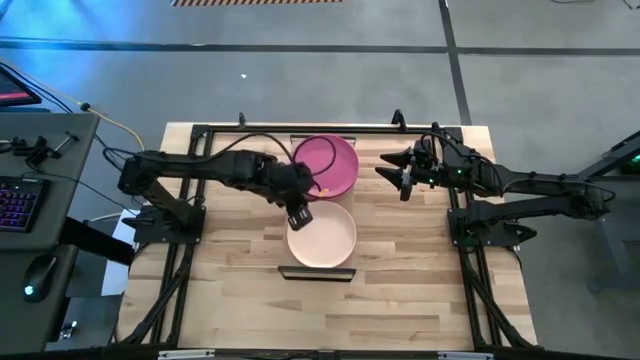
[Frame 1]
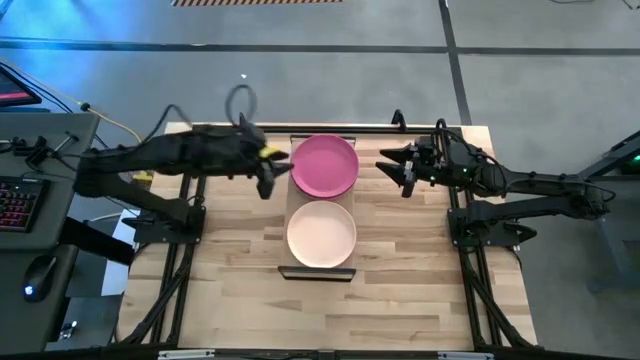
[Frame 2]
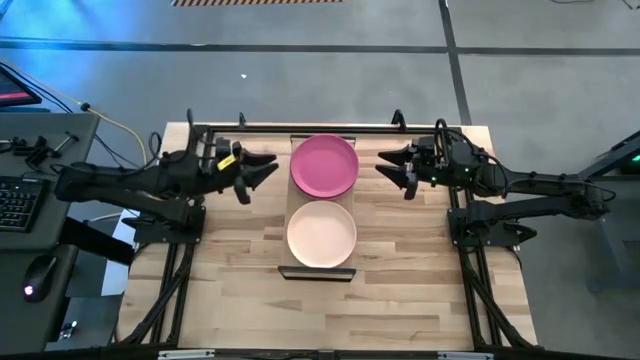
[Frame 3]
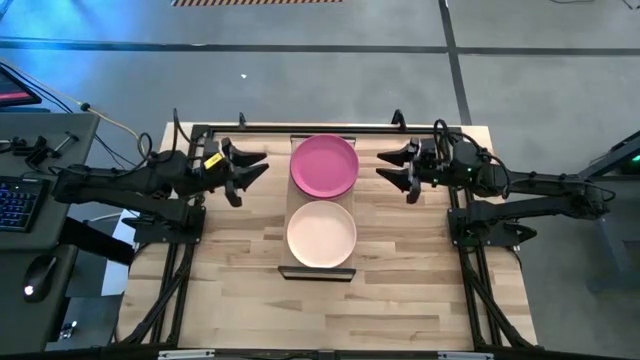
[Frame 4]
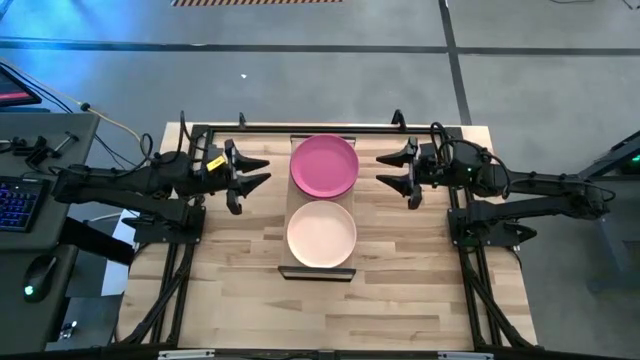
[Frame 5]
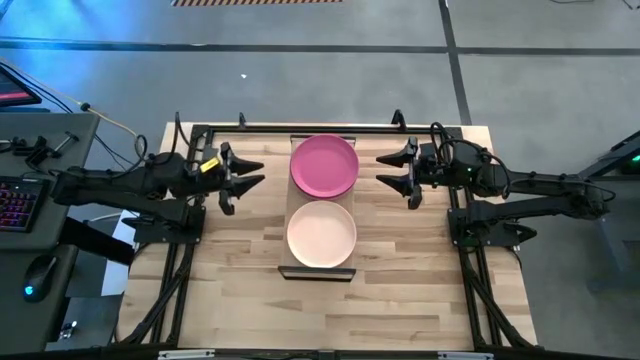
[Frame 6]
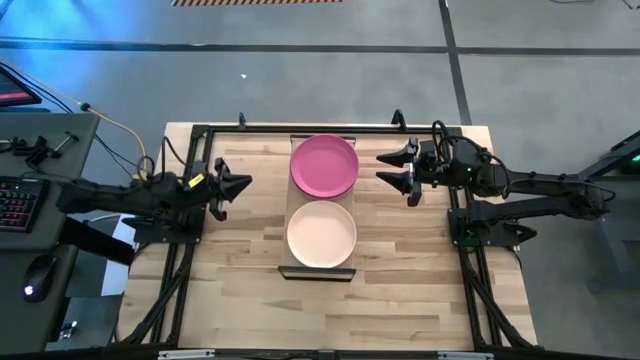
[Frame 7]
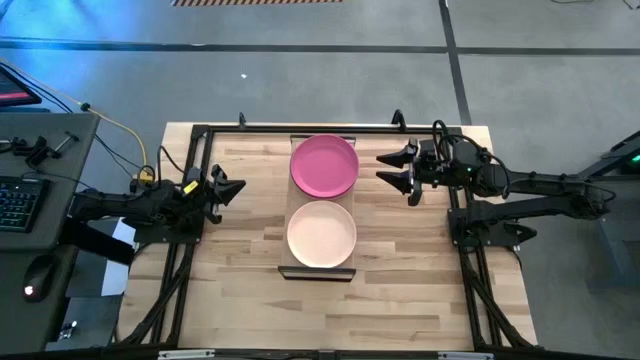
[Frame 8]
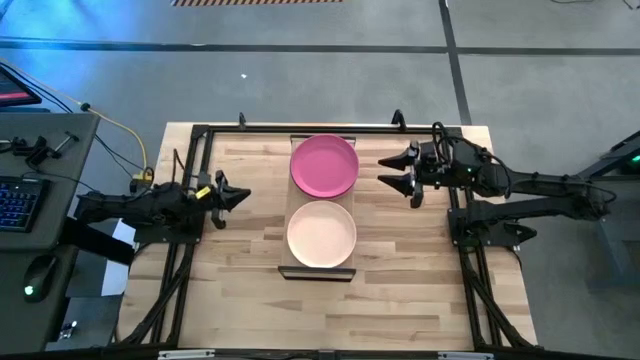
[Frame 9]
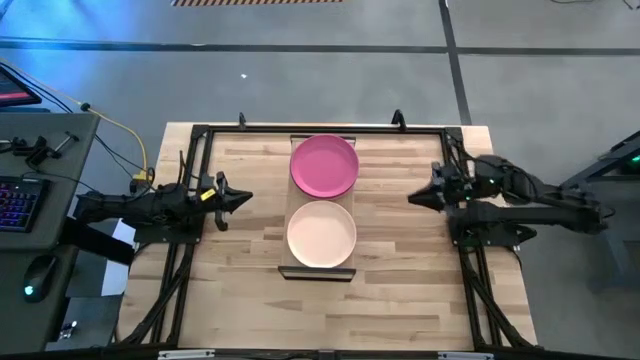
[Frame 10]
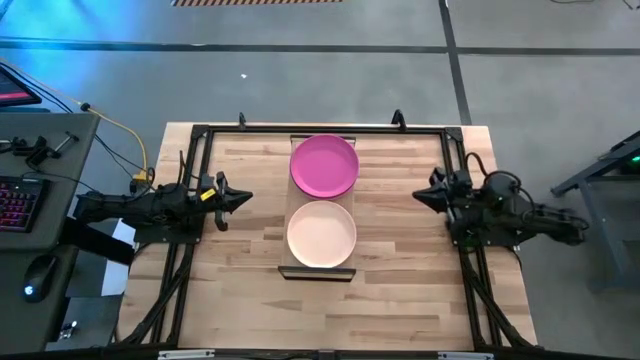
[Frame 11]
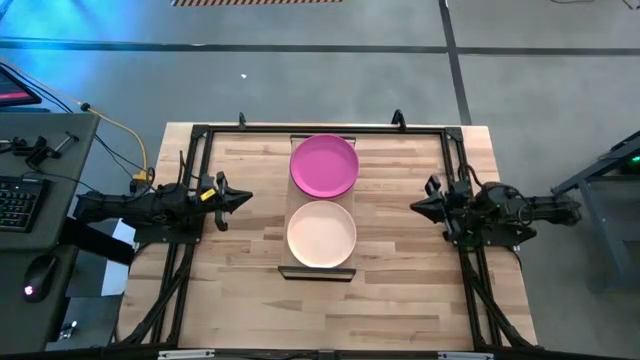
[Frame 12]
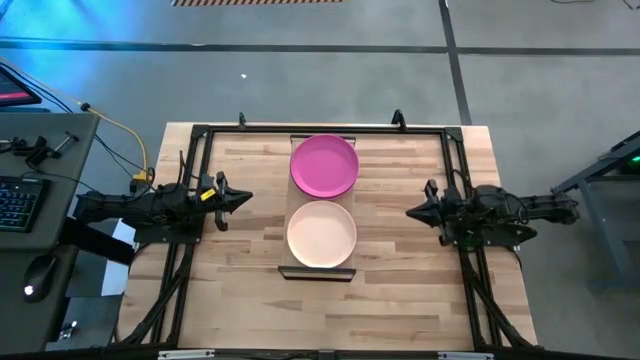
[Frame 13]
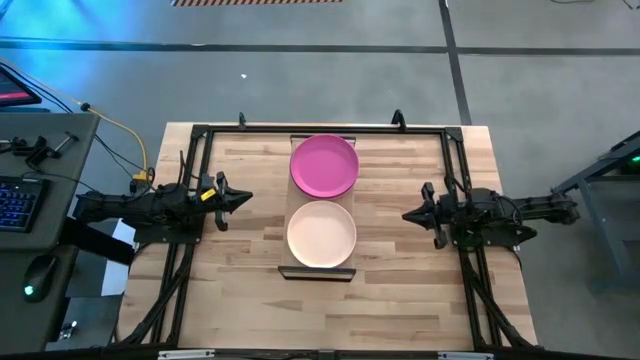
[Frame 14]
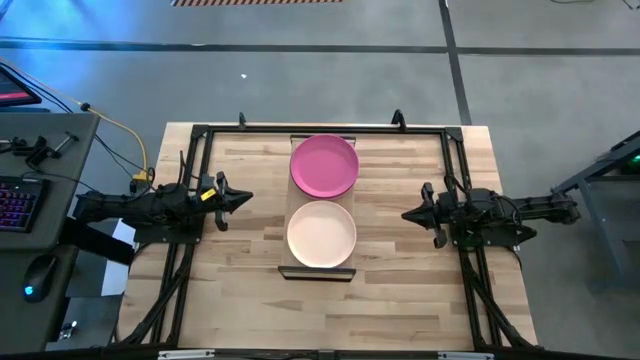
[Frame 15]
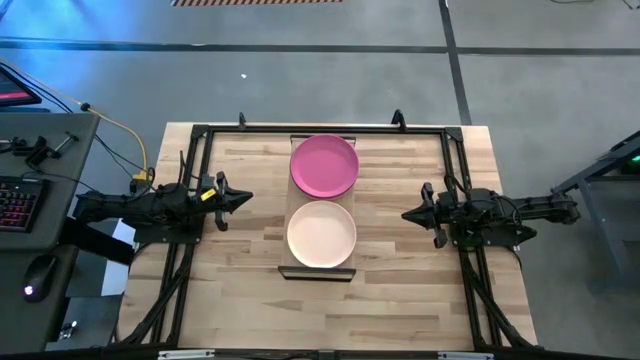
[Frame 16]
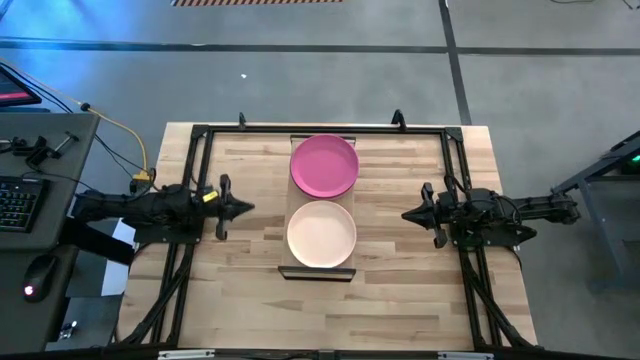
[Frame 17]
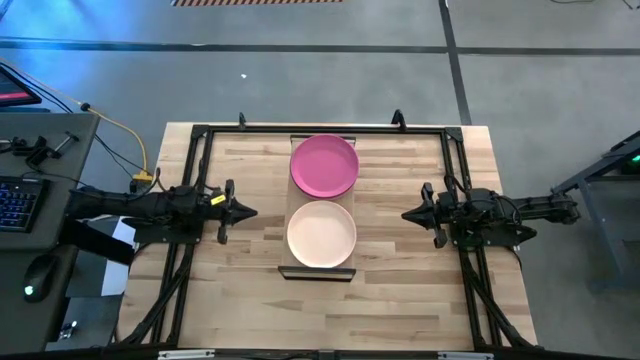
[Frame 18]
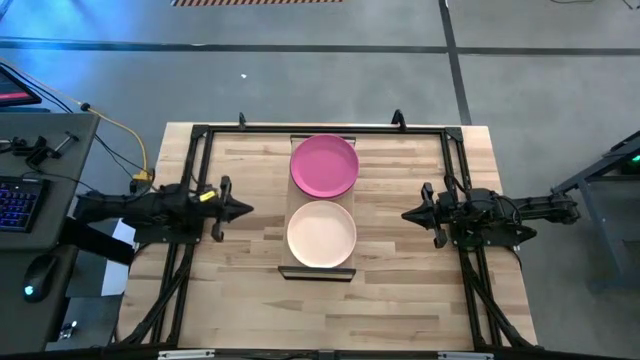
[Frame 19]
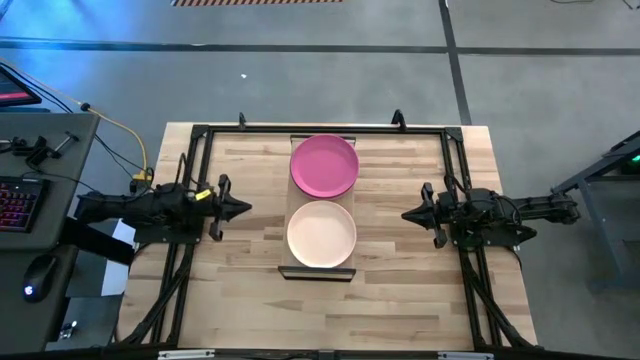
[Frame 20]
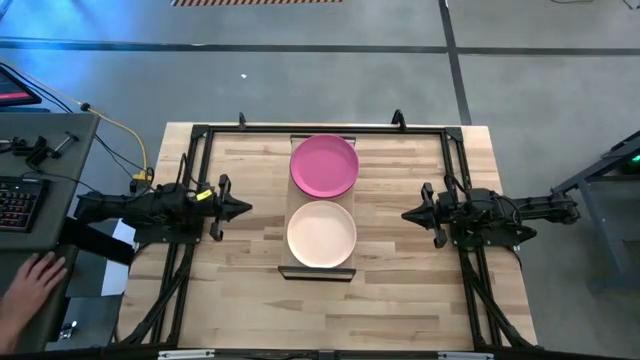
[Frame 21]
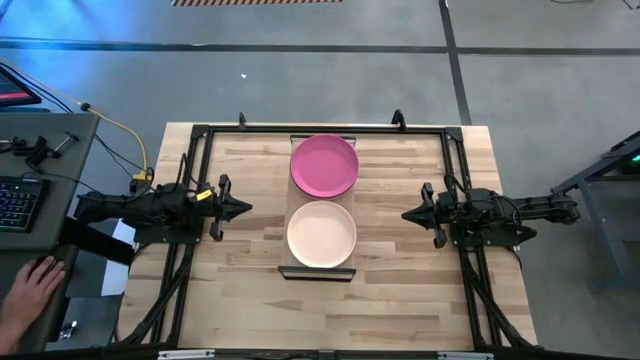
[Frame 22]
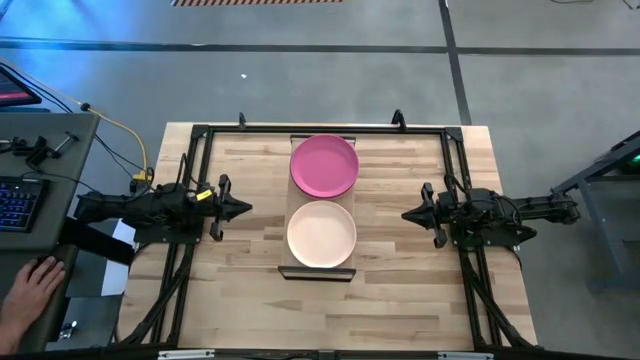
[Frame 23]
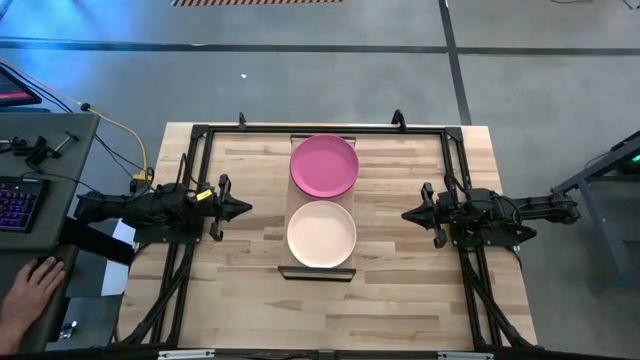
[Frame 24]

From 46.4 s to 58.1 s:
Task: Place and stack plates onto a shelf
Return to Home Position

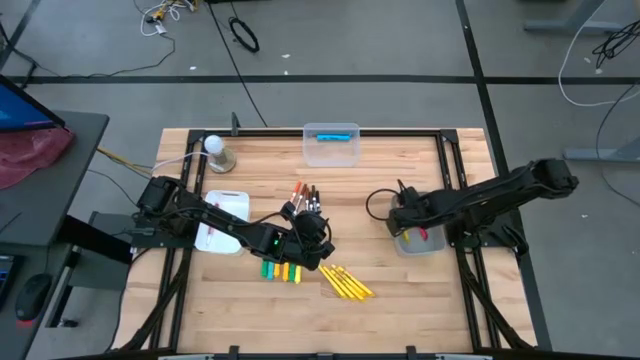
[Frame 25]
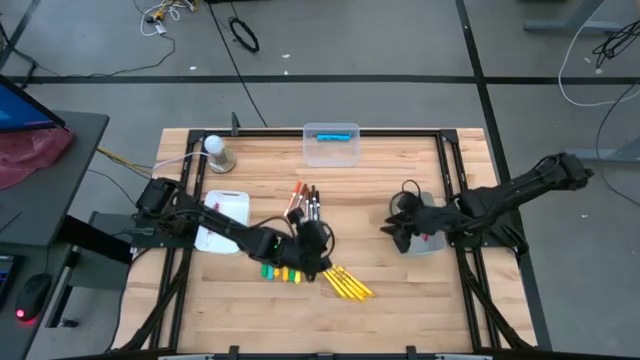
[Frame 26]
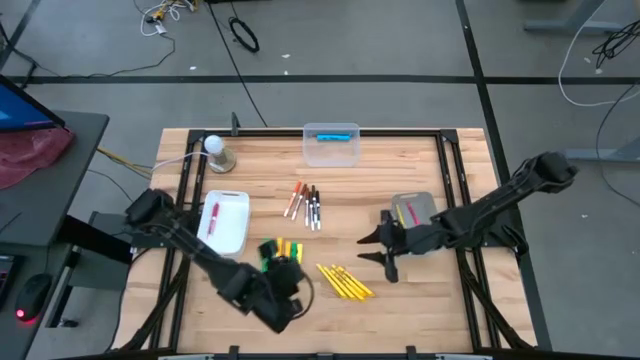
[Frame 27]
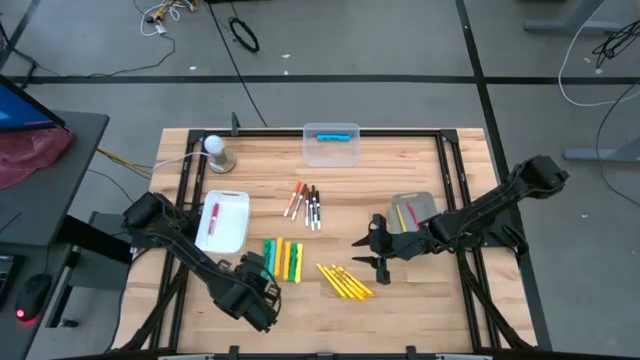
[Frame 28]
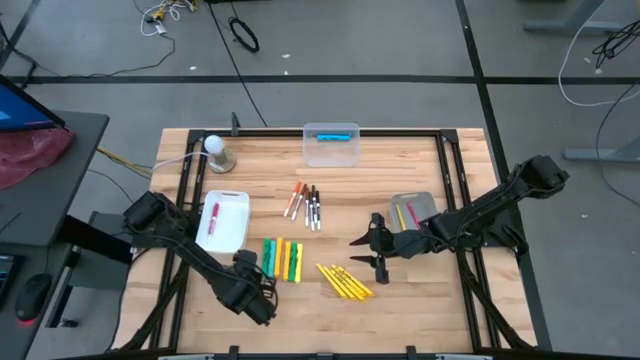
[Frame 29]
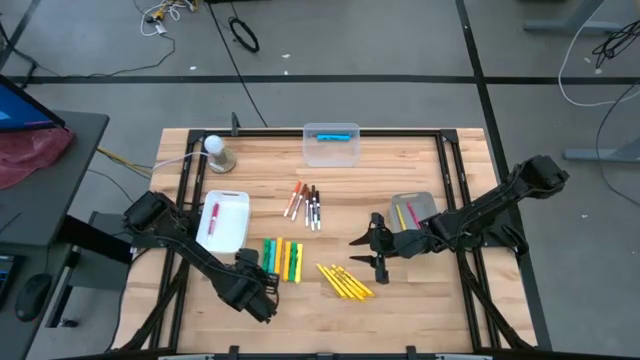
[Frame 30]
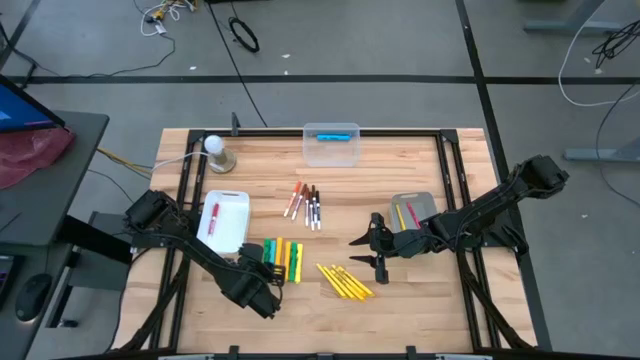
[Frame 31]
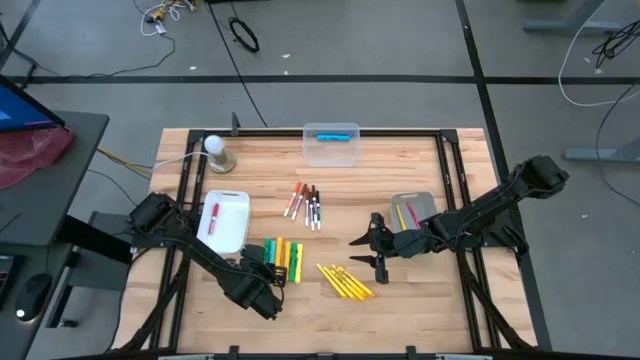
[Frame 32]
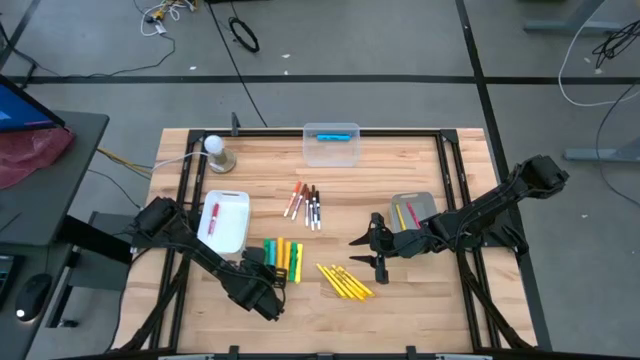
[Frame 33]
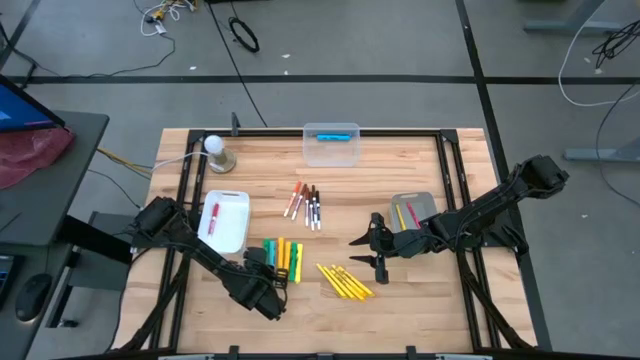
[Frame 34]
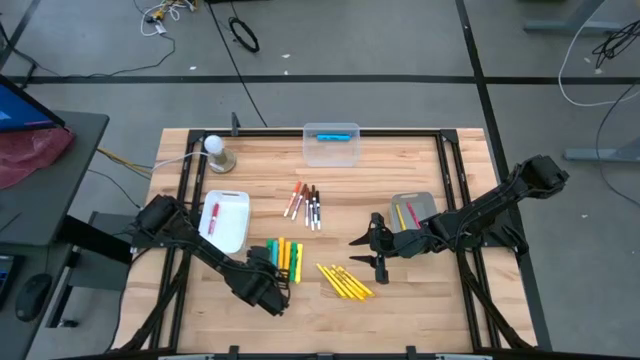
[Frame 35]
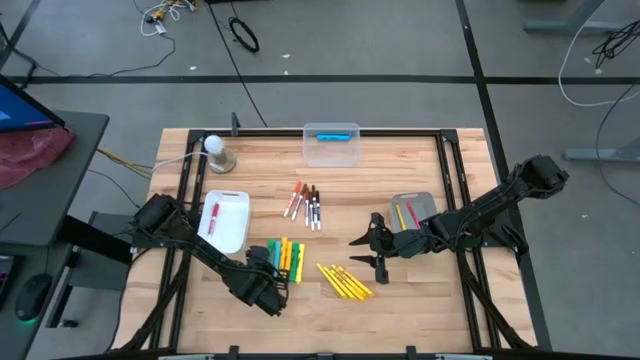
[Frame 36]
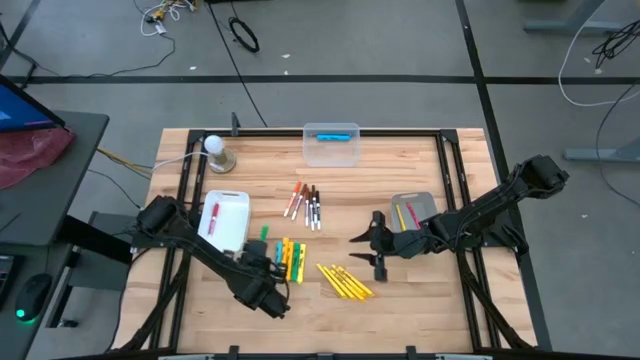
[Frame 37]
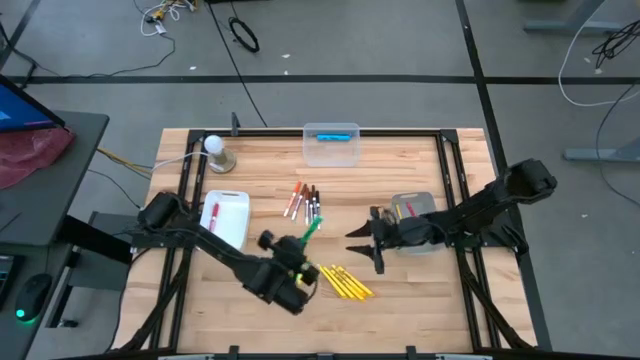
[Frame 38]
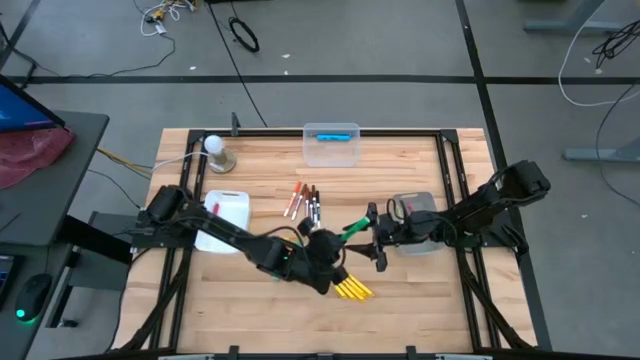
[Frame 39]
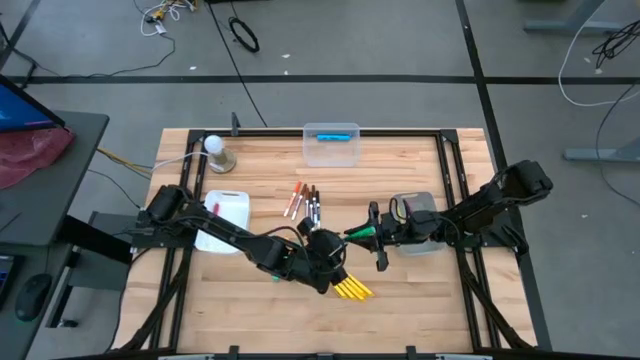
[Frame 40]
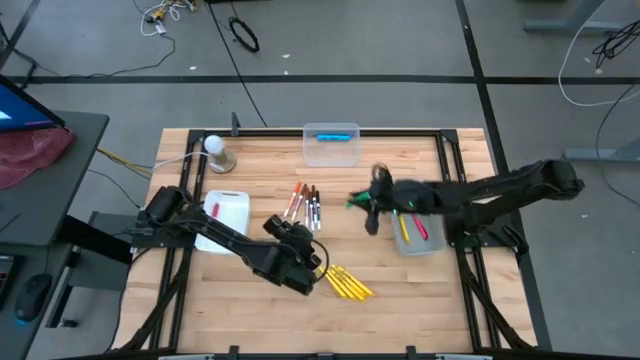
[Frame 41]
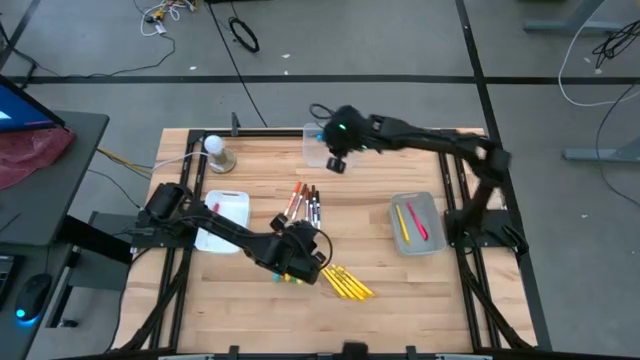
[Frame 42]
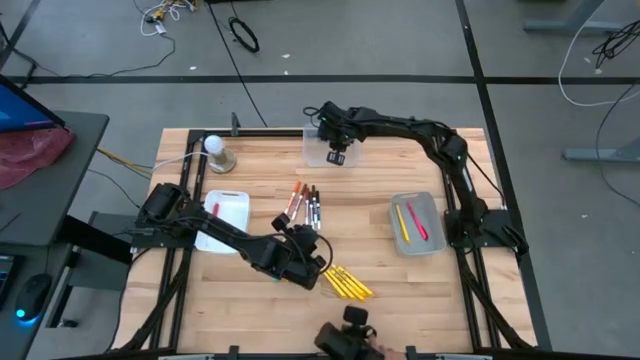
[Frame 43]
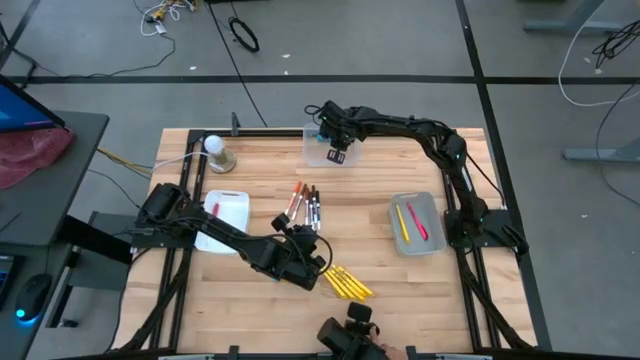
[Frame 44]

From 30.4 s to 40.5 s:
Task: Pick & Place Markers
Put the green highlighter pen into the transparent bin
